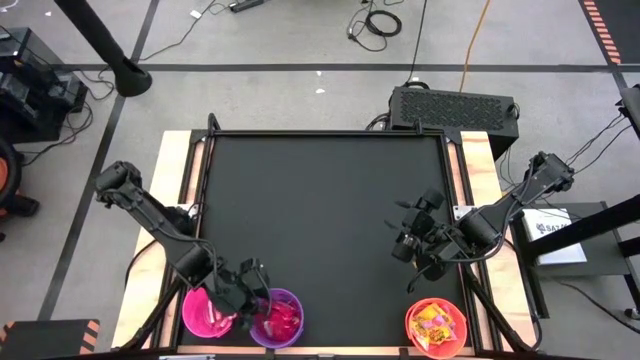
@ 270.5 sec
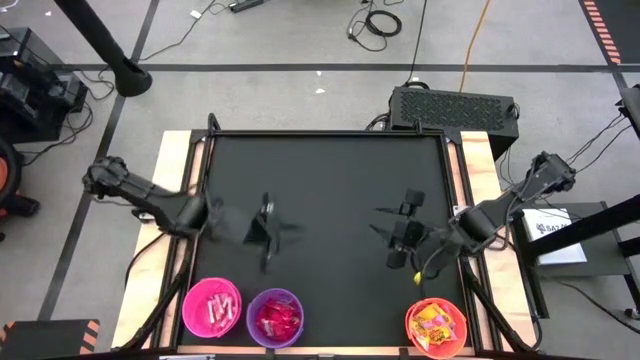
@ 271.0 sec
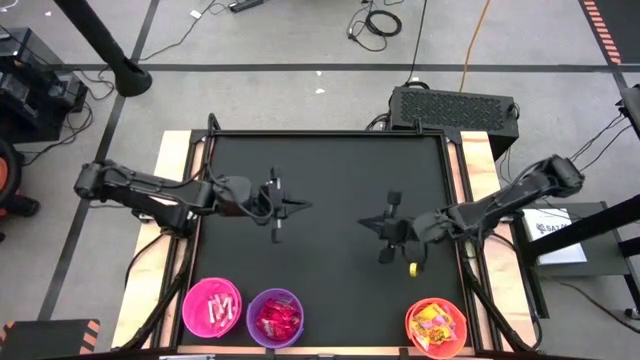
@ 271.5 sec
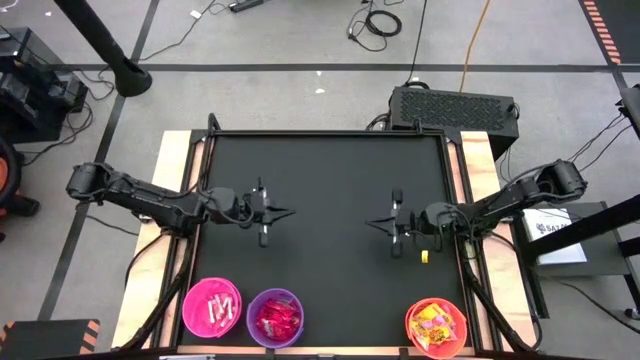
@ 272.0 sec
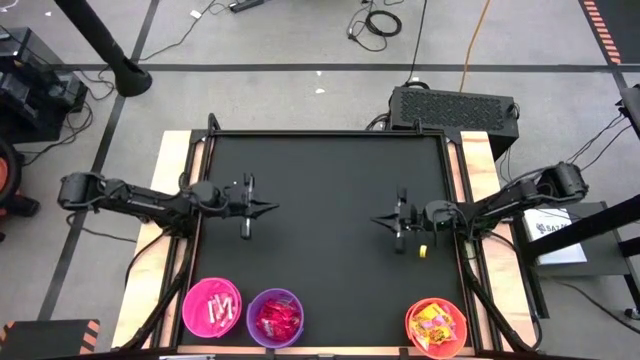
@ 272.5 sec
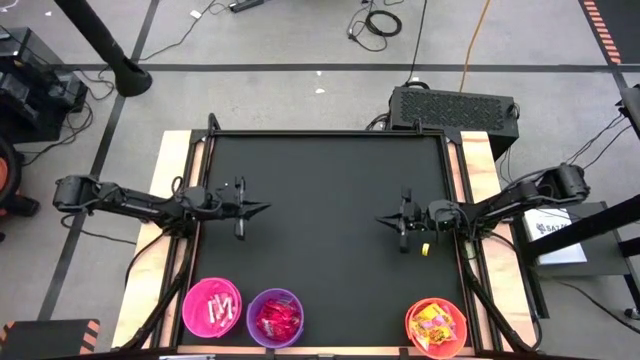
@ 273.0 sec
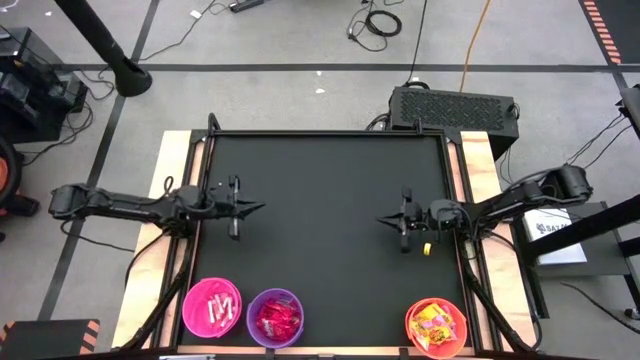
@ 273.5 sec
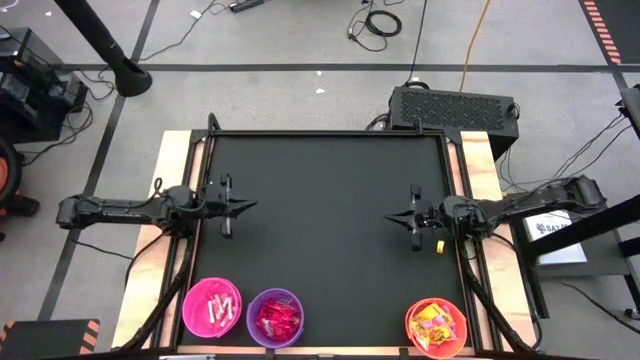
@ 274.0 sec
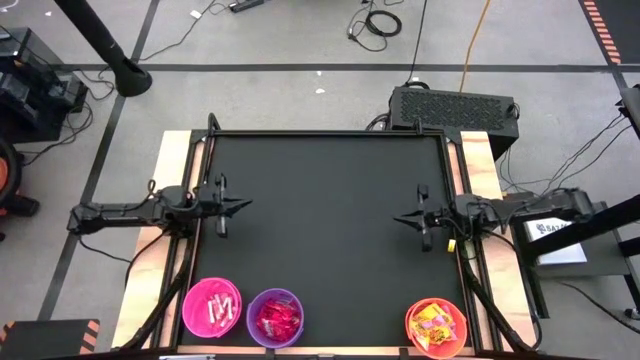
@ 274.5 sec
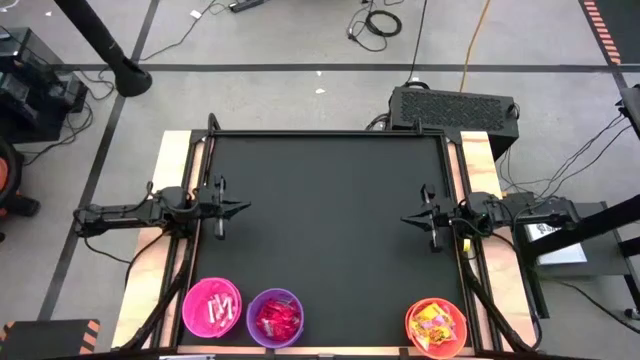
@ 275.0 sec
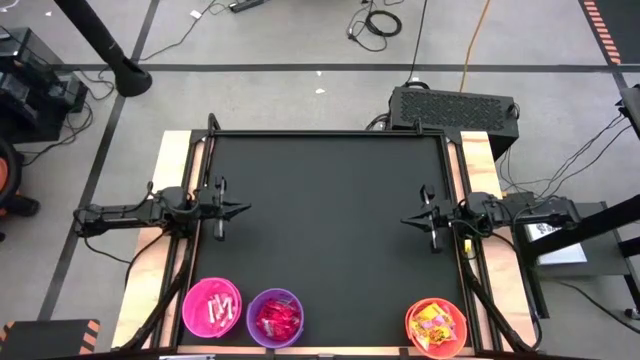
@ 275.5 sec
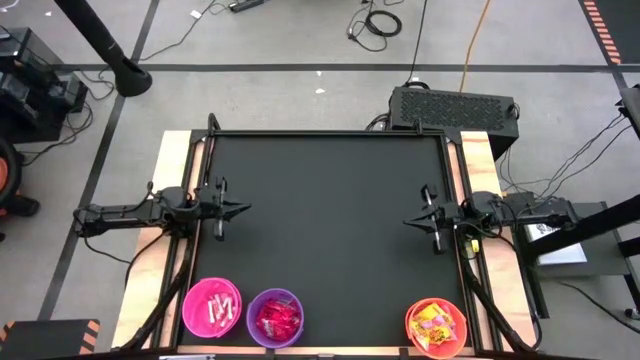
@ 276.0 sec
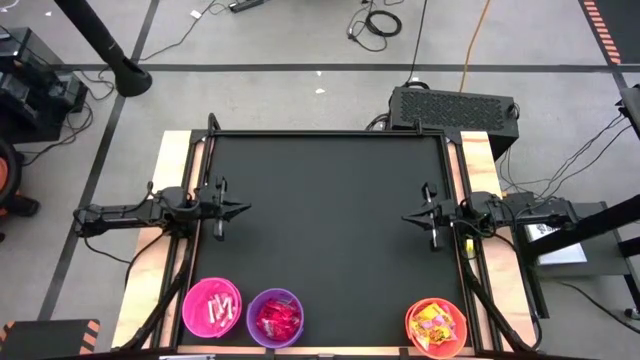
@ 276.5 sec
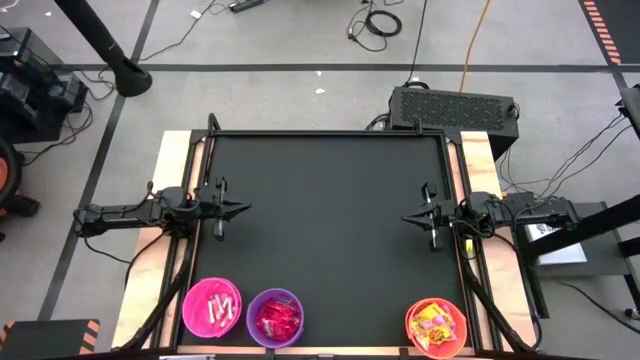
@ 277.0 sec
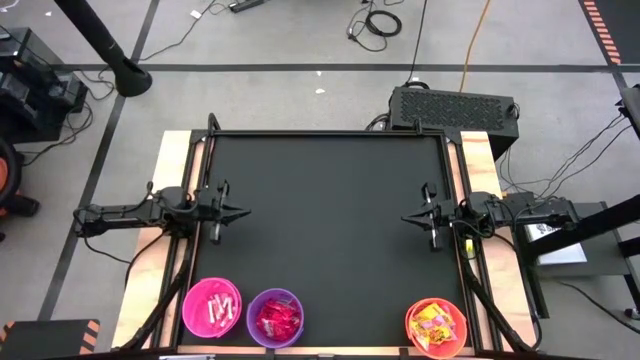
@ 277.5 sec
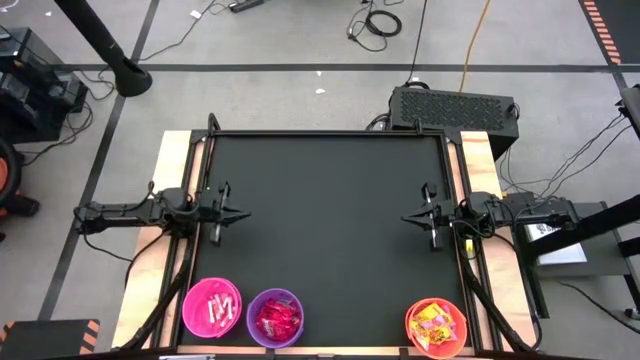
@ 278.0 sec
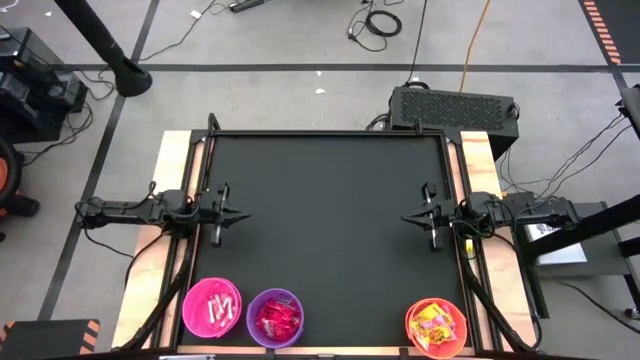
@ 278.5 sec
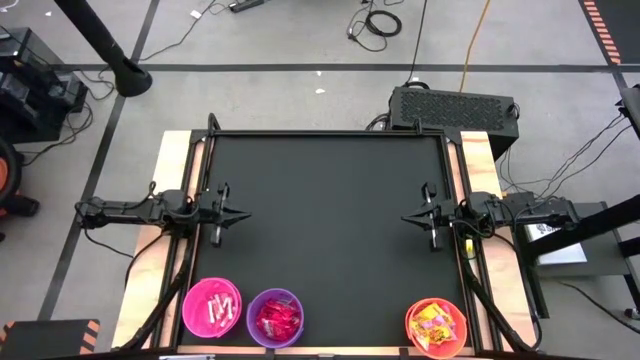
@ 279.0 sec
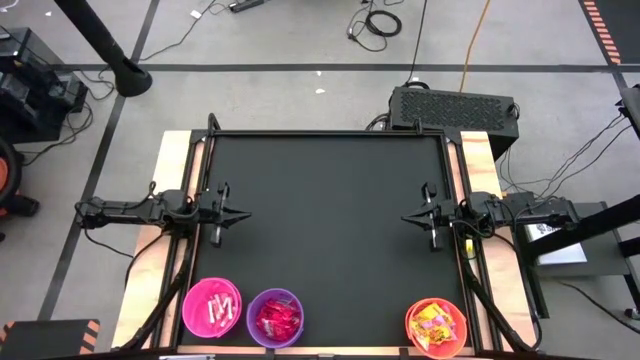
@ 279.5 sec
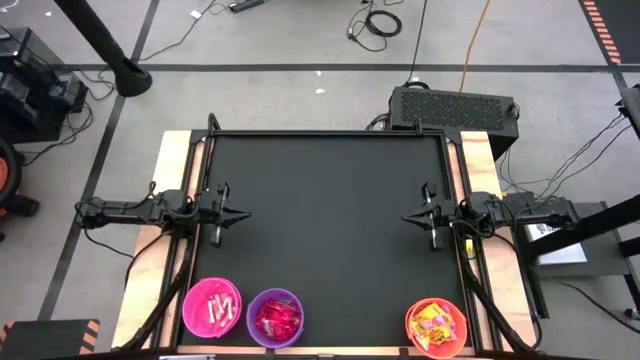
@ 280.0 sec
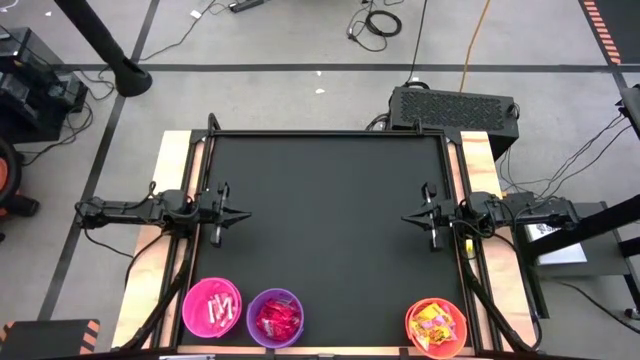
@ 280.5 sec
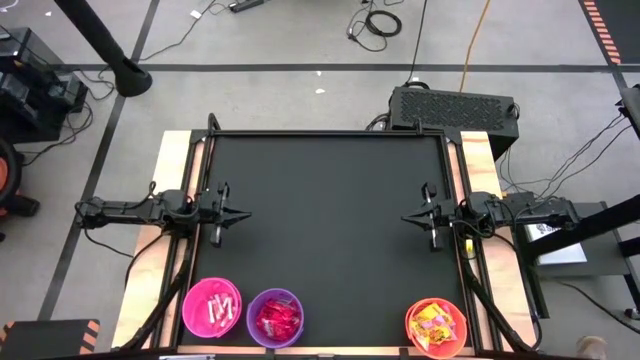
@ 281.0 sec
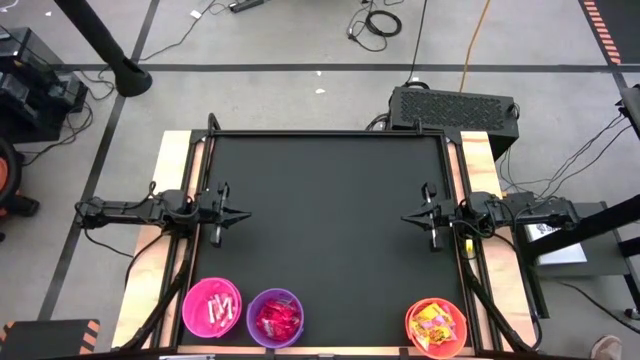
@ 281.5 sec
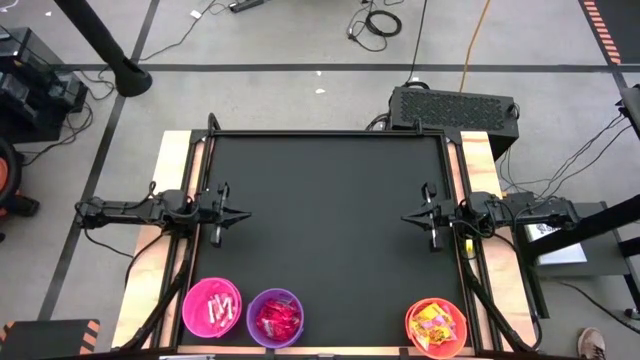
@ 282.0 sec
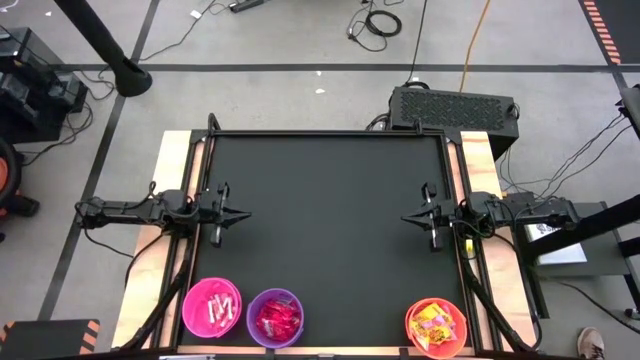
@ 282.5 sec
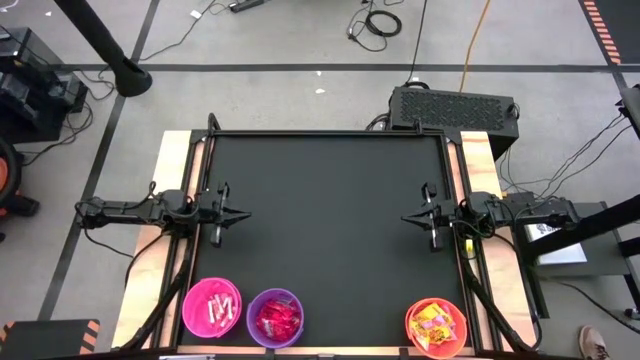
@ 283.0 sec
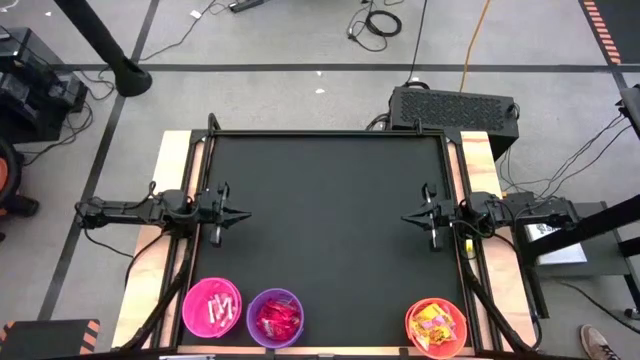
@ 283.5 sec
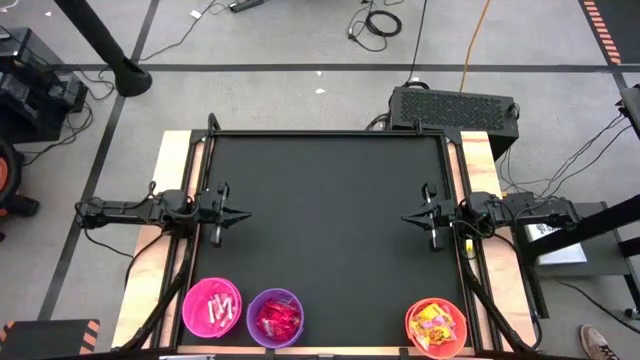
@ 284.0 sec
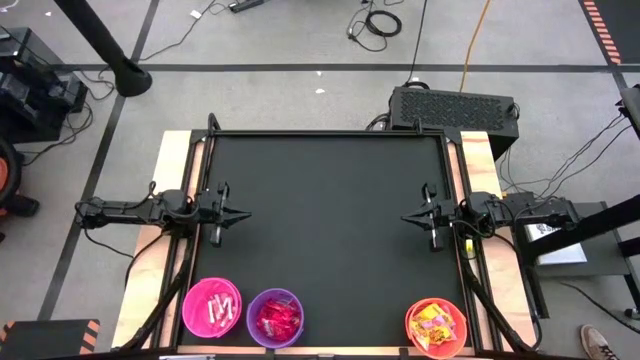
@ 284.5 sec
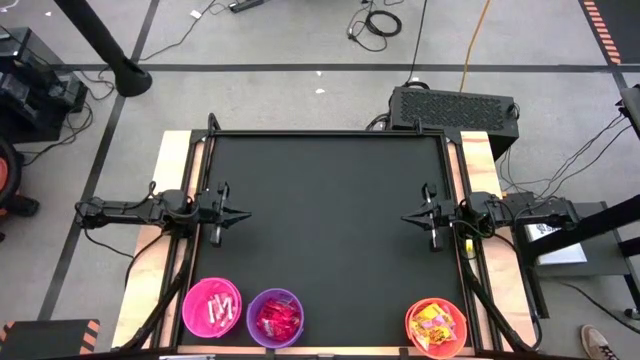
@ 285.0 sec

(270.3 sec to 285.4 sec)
Task: Sort candy by brand, put in halloween buckets
Return to Home Position

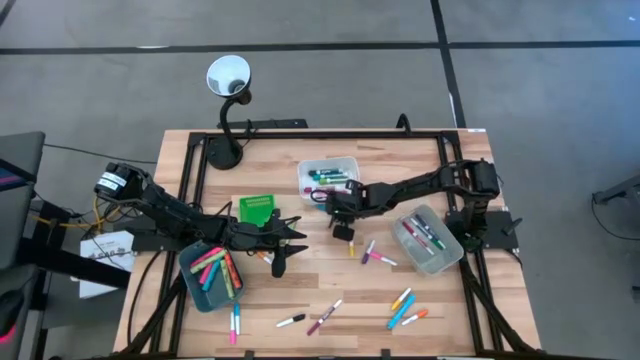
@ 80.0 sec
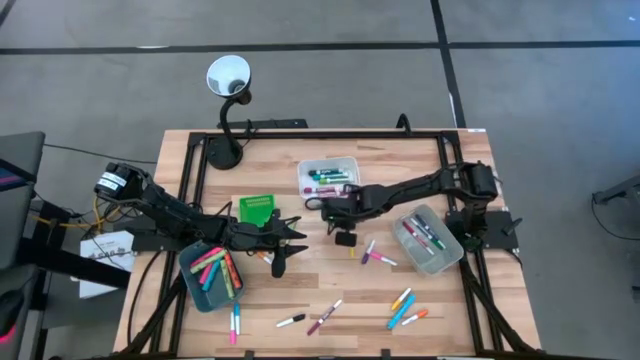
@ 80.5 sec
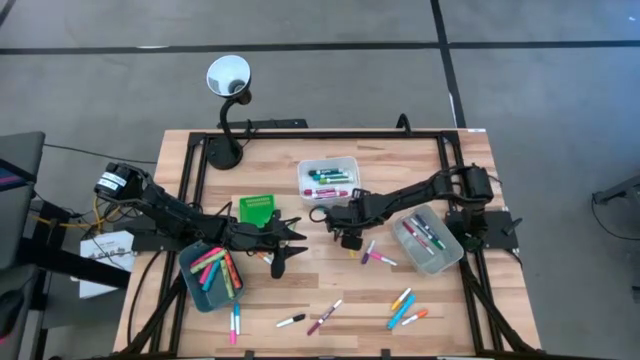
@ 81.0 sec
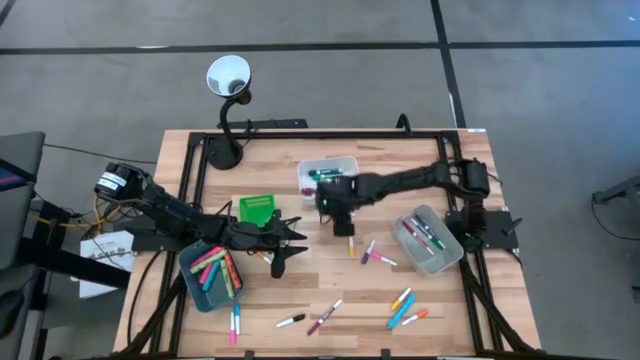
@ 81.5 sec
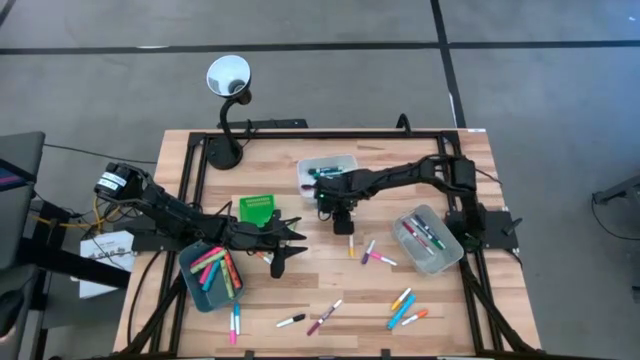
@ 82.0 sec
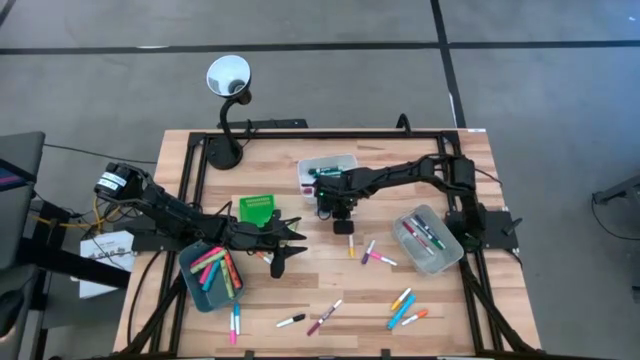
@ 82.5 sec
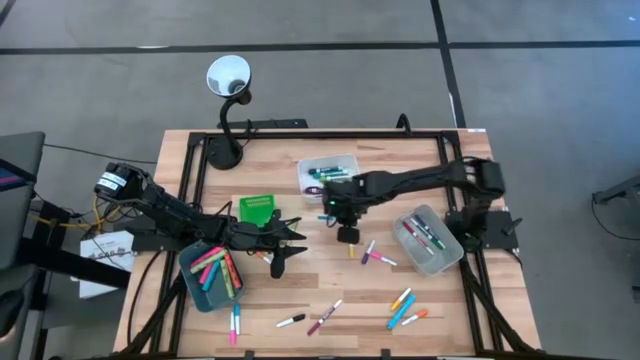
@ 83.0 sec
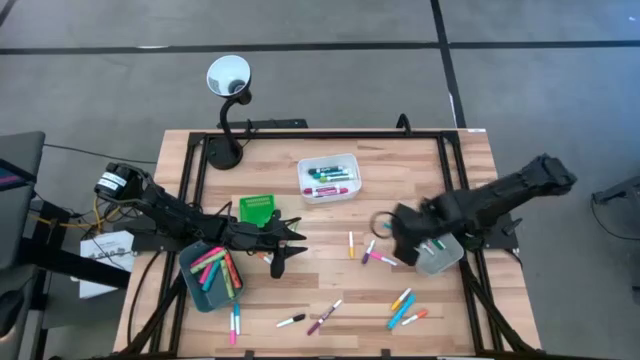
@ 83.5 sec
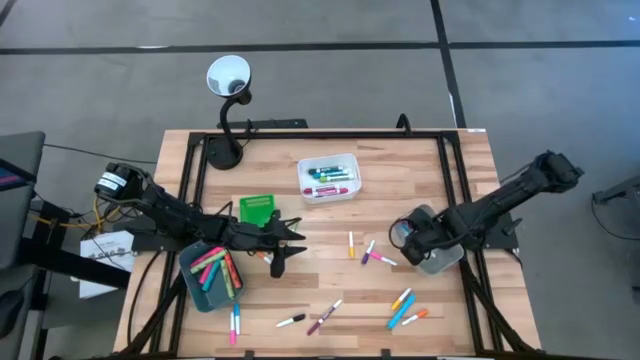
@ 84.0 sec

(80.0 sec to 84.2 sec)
Task: Pick & Place Markers
Put the small light blue marker pen into the gray bin
